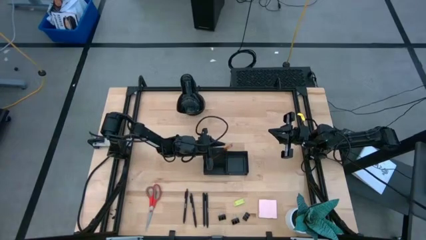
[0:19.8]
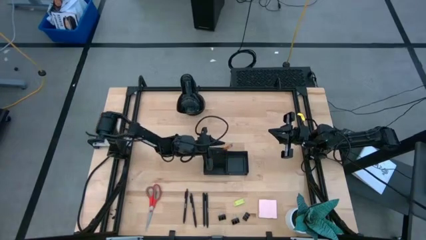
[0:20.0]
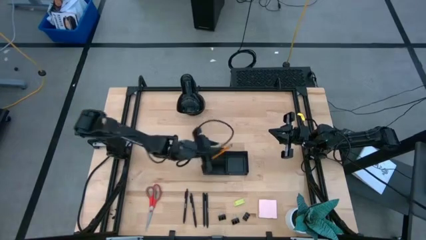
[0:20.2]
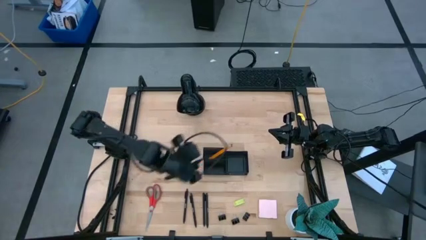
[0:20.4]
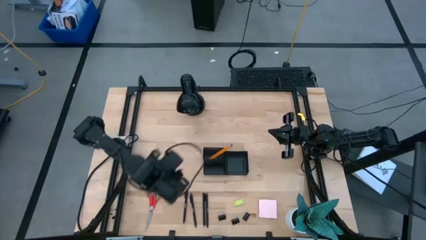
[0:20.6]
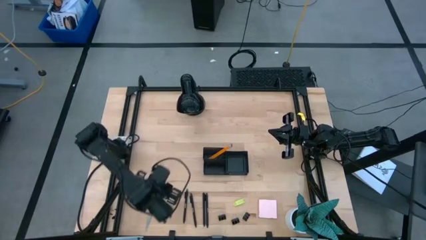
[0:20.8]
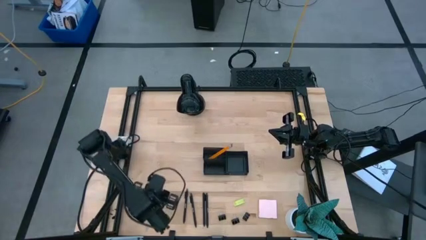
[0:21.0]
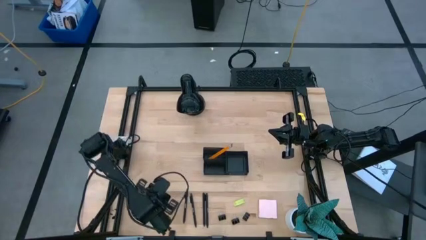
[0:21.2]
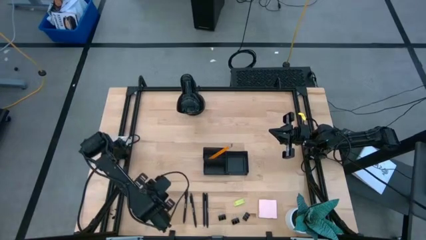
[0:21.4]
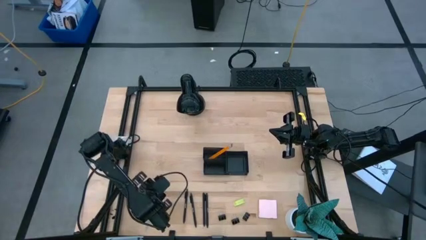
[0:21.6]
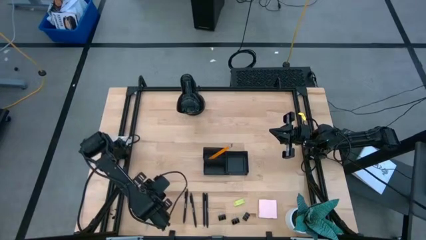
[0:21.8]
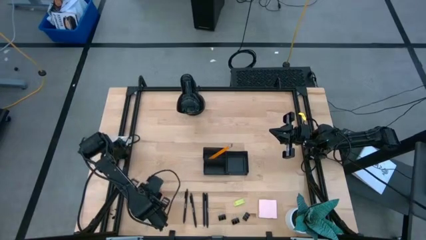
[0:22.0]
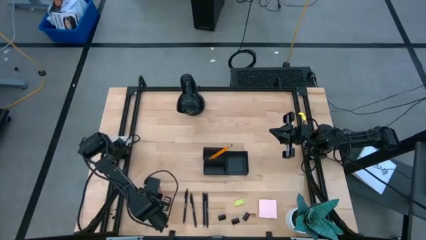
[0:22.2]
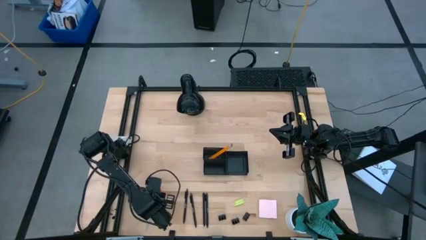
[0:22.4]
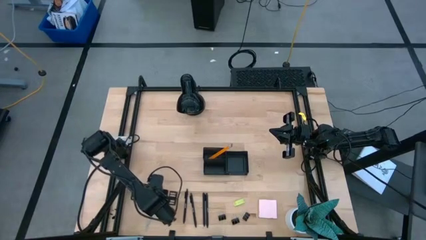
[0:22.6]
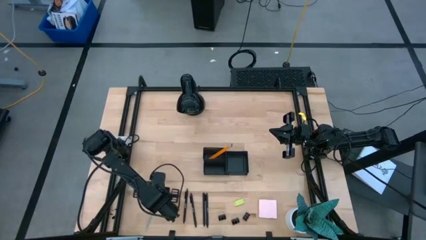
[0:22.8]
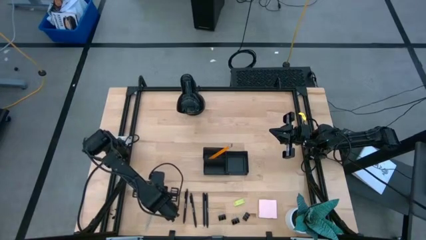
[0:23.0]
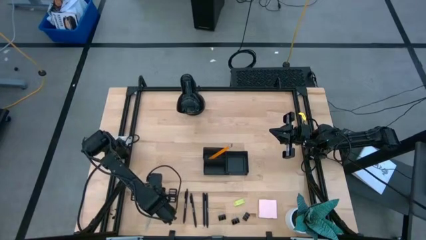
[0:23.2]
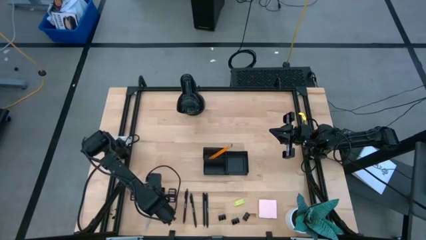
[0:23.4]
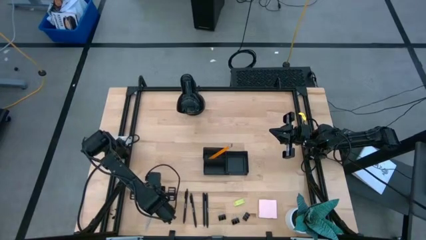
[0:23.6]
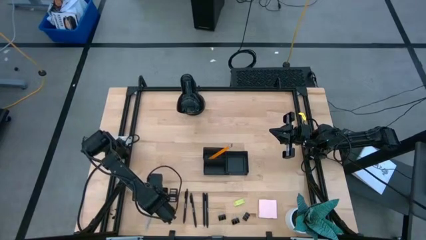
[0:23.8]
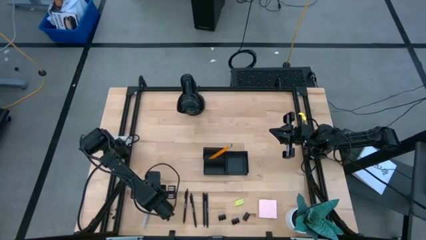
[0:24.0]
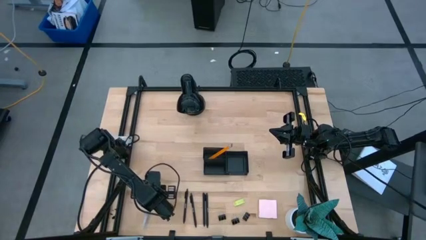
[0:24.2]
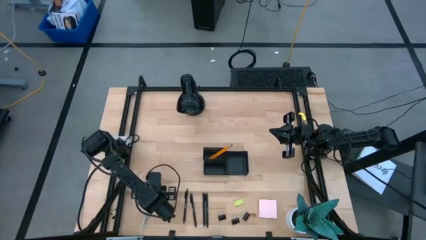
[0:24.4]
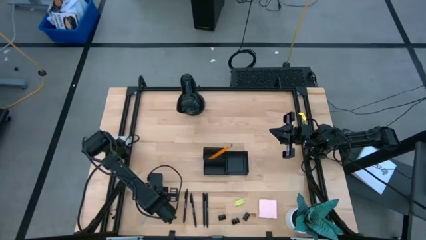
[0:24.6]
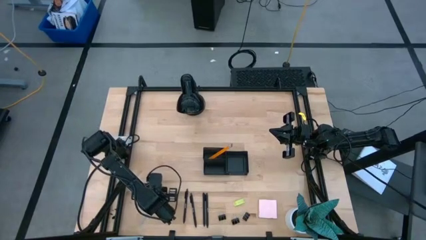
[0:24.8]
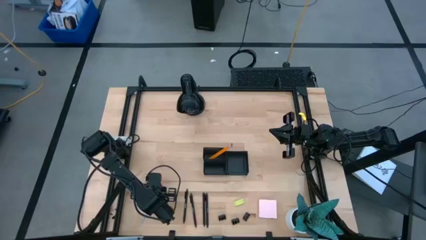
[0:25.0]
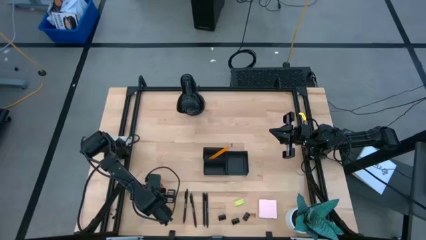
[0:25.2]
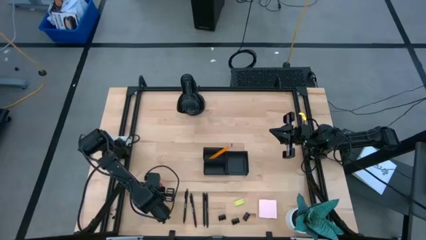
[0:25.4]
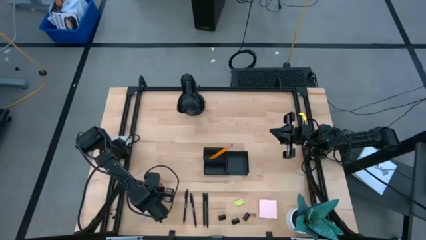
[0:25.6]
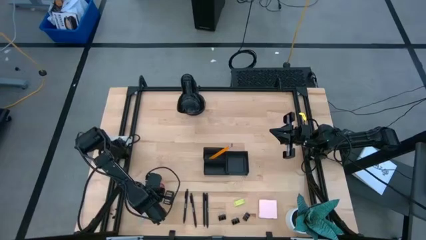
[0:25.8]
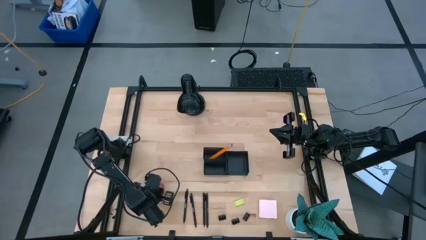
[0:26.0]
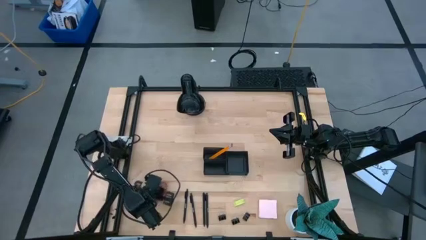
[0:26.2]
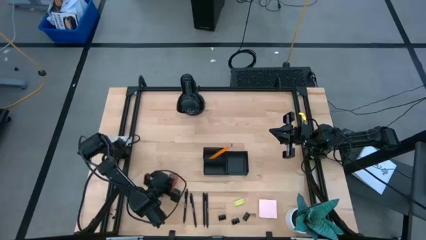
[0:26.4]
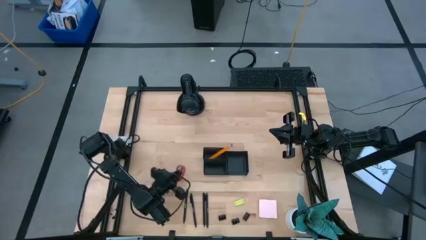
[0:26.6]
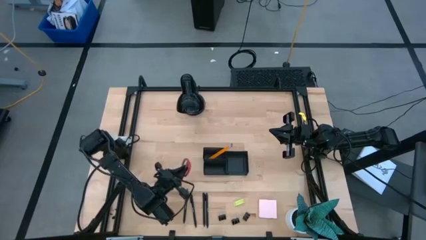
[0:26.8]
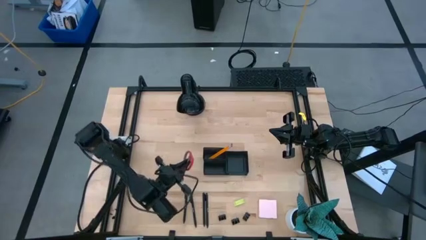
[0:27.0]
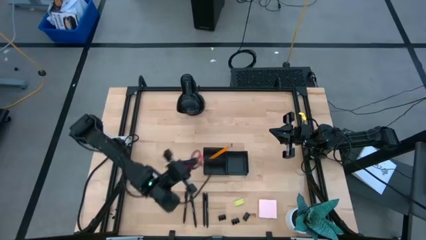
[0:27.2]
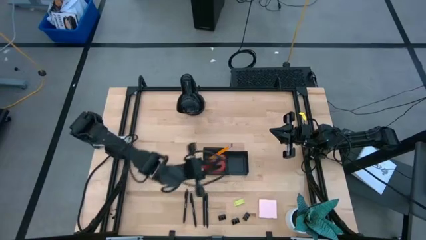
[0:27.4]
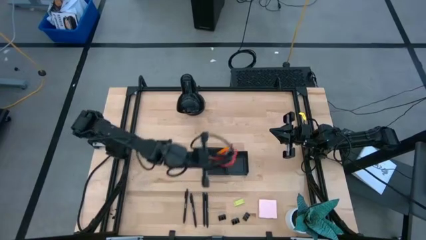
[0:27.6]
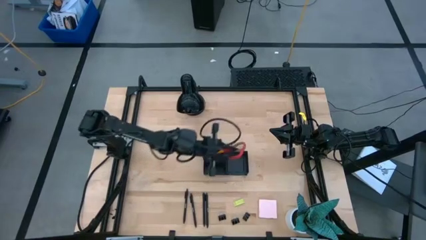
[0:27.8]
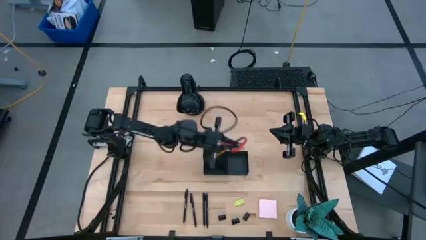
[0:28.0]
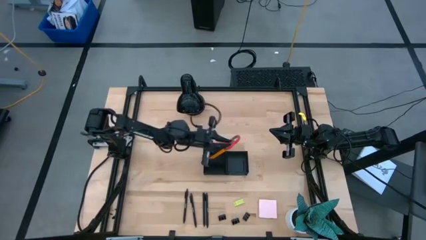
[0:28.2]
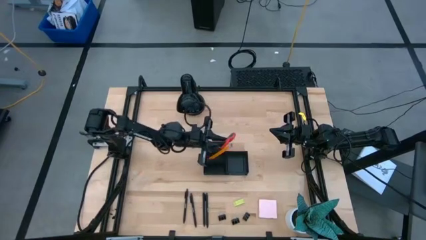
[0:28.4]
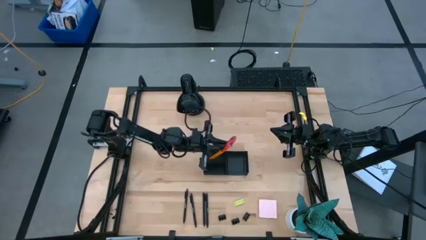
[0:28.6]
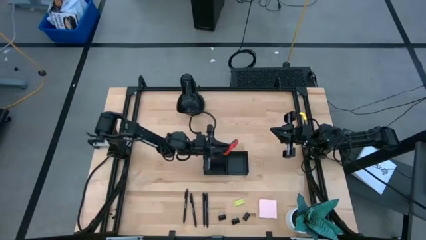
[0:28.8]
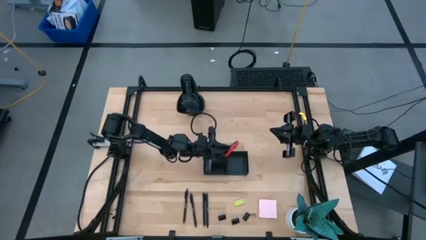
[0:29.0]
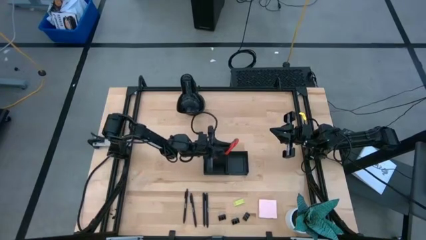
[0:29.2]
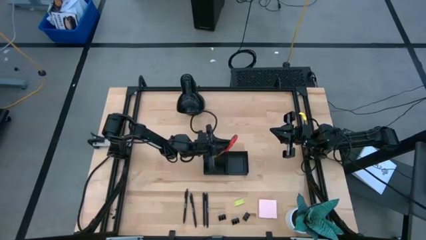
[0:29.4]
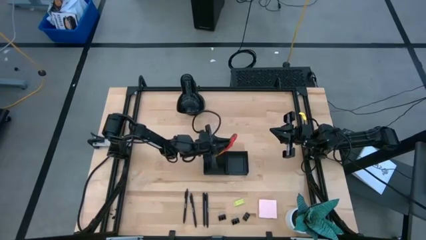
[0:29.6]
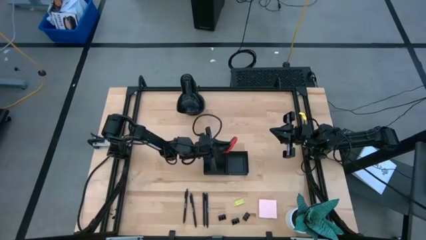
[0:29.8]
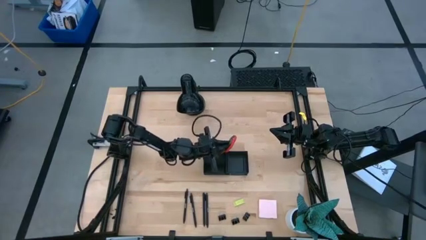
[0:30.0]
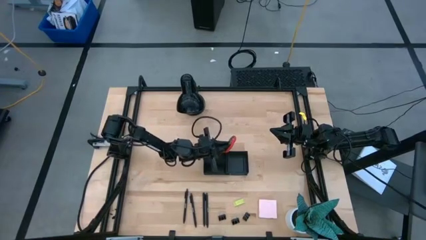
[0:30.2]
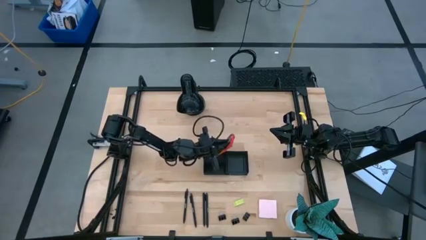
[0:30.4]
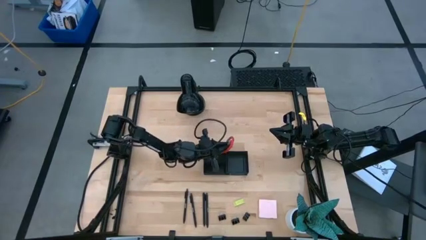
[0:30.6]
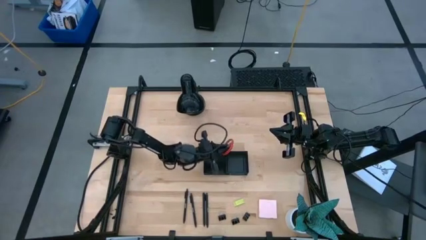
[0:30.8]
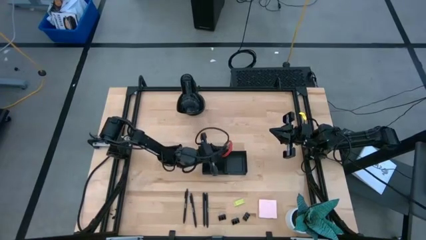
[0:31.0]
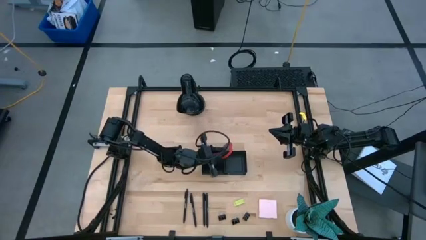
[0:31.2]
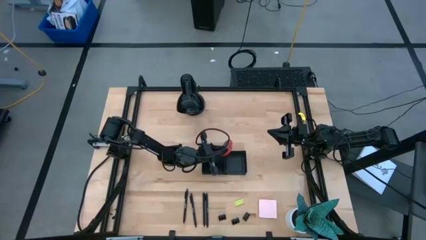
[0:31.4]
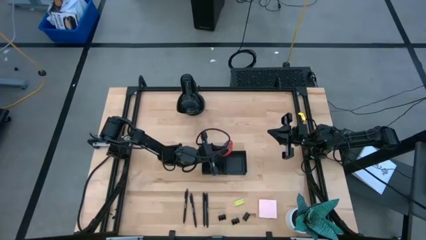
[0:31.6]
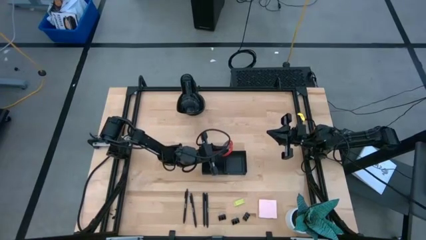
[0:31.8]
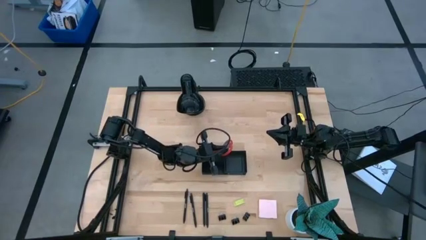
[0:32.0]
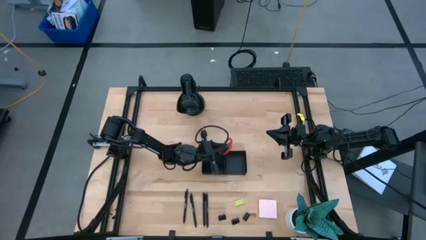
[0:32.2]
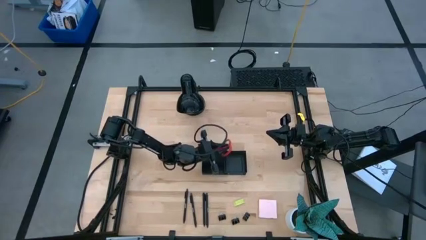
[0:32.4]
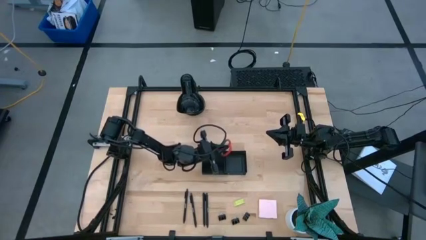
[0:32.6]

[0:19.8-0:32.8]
Task: Pick and place office supplies into organizer
Put the scissors into the desk organizer

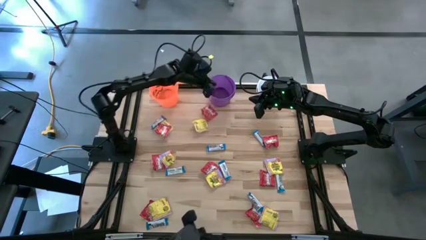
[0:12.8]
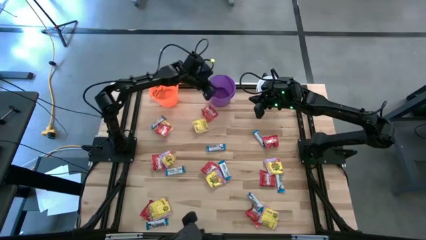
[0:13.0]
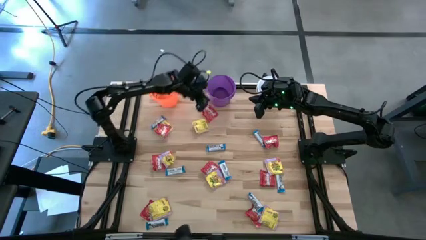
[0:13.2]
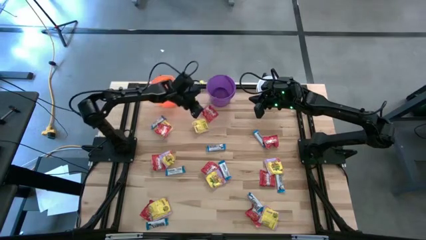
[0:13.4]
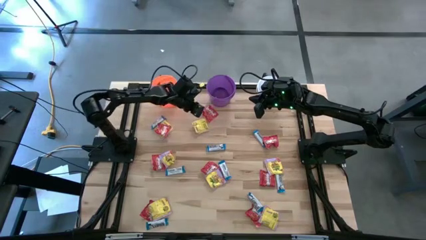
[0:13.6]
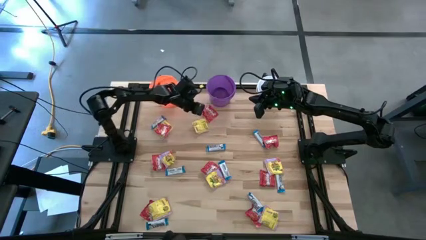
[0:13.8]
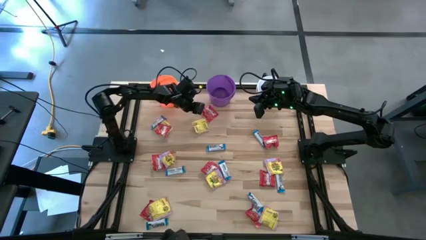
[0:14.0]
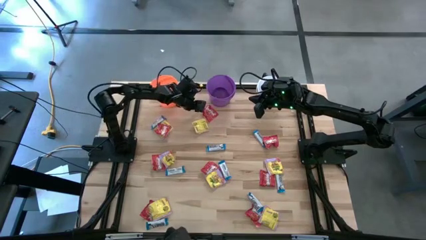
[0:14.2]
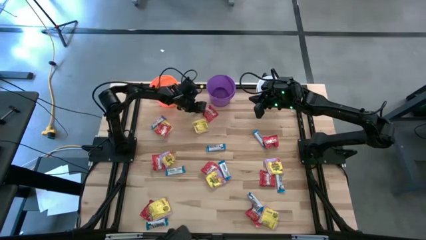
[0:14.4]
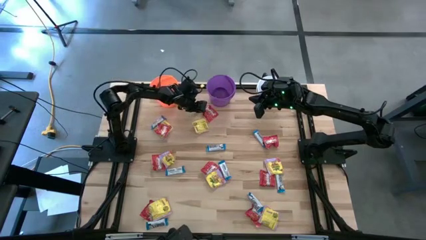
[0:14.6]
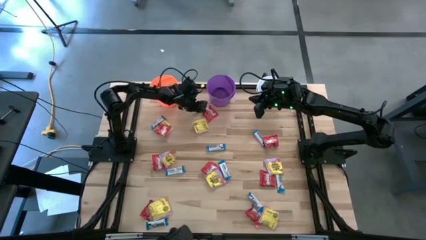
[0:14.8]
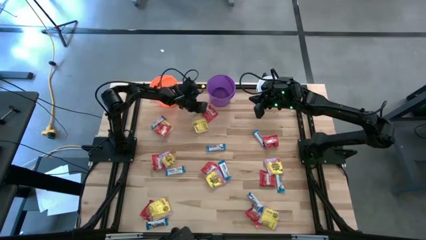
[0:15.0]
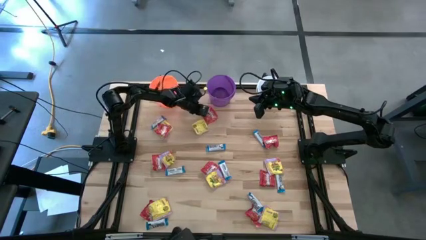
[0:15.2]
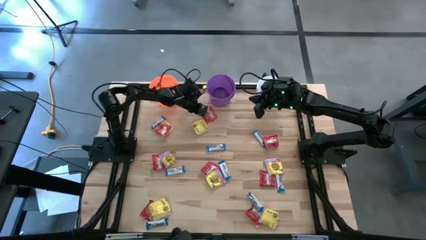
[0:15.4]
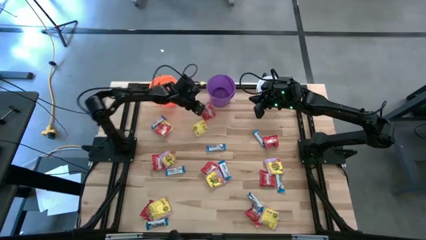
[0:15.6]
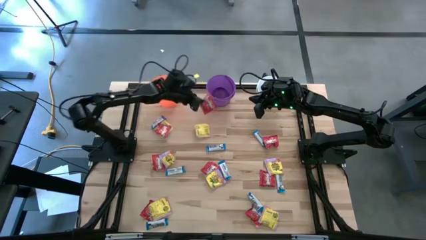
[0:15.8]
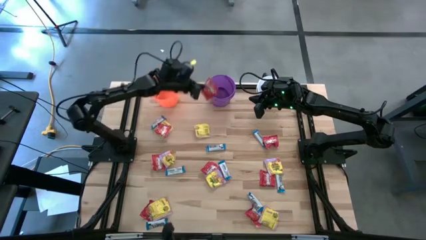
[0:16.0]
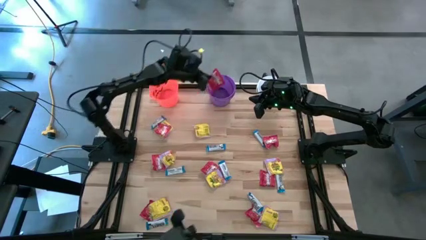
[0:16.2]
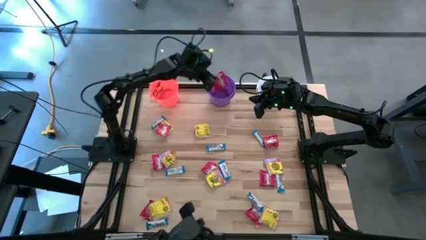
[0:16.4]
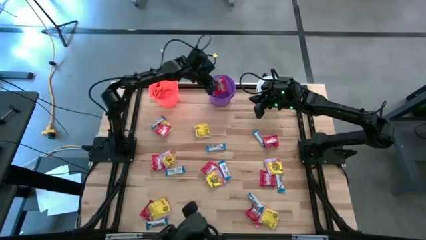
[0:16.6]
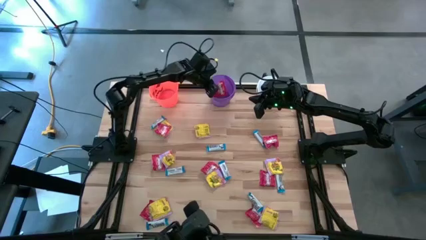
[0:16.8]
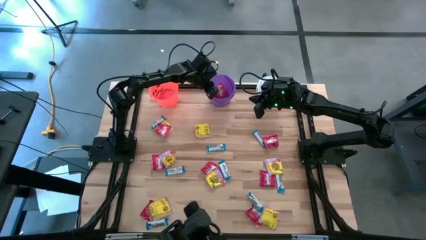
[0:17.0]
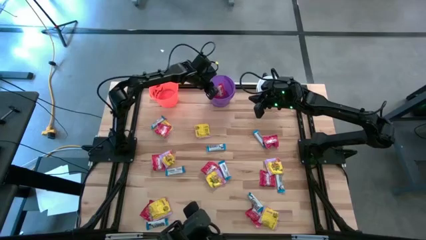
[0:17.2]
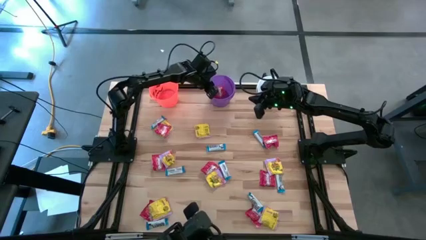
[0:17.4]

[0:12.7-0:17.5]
Task: Sort candy
Put the red candy into the purple bucket
